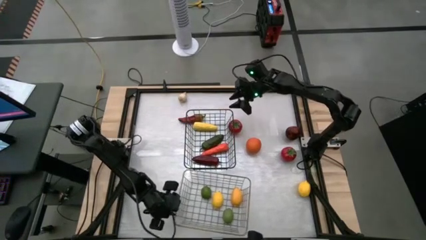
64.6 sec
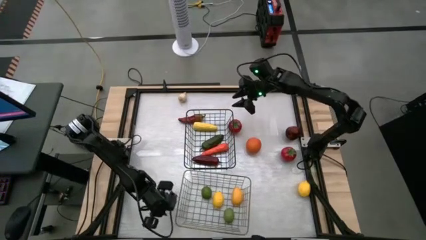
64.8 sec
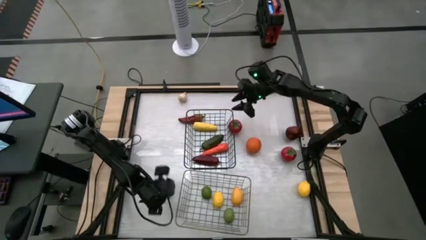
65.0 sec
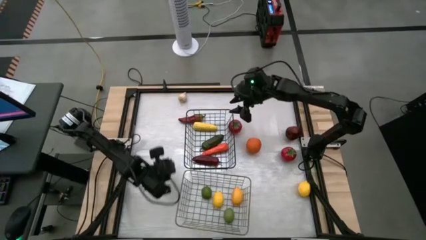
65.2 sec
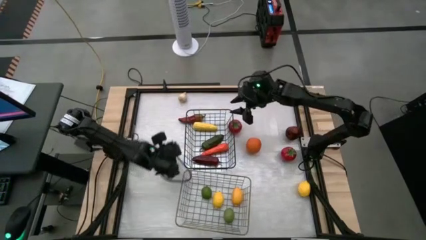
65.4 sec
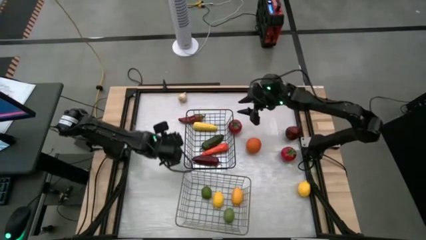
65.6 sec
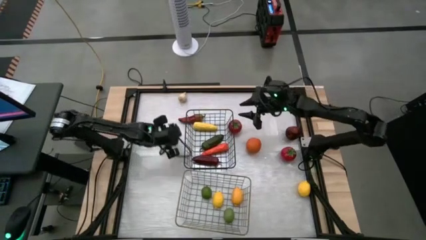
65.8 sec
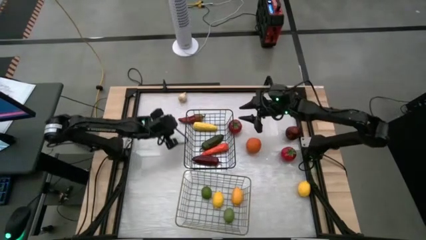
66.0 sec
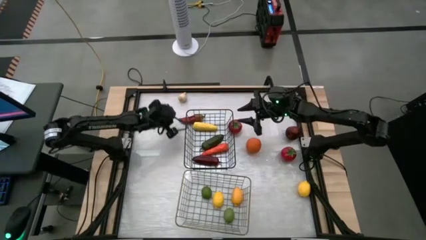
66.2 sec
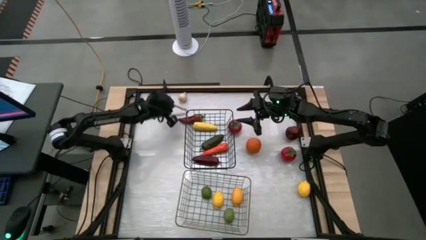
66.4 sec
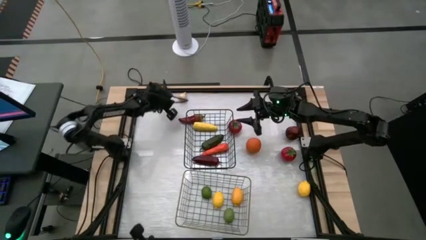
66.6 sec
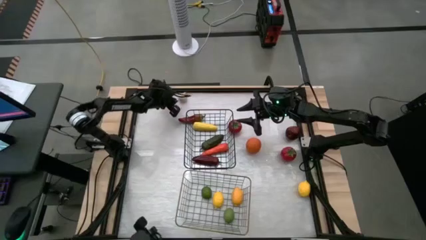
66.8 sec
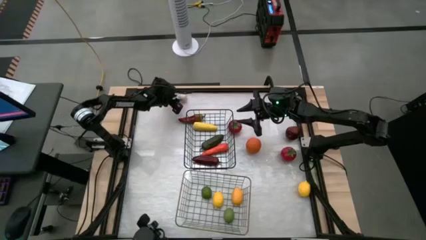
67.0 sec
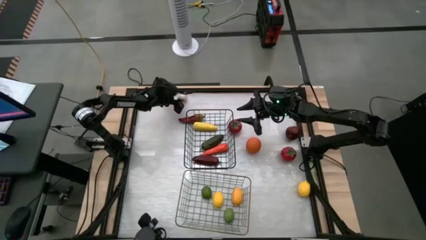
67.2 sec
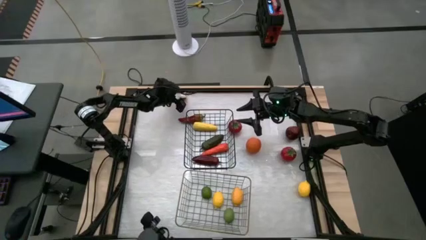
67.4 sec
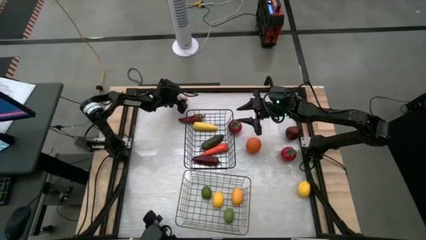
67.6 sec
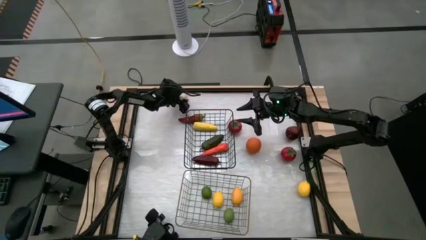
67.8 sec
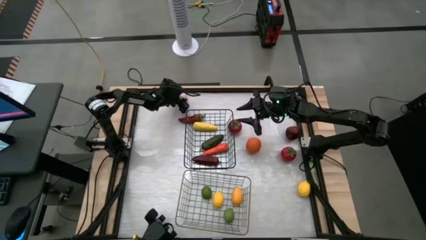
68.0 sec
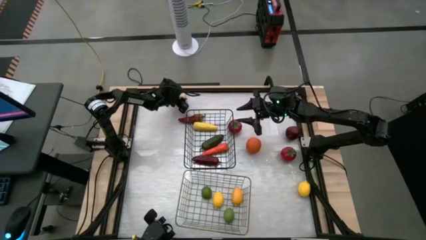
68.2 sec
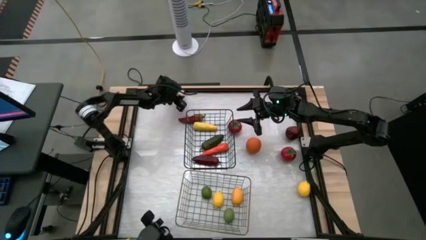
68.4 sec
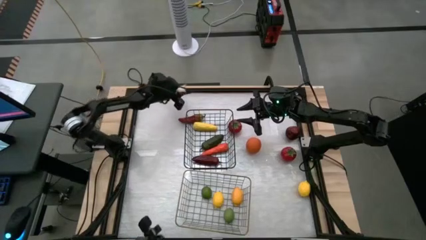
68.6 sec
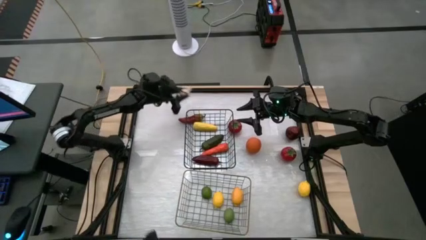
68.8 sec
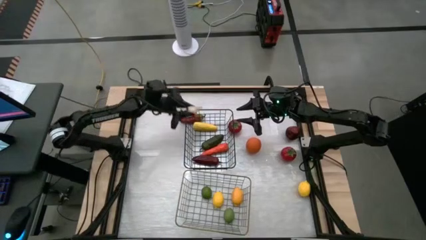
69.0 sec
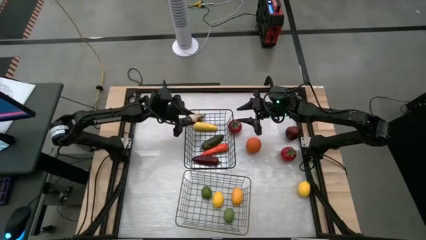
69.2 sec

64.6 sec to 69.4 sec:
Task: Sort produce into baskets
Put the white garlic into the black wire basket

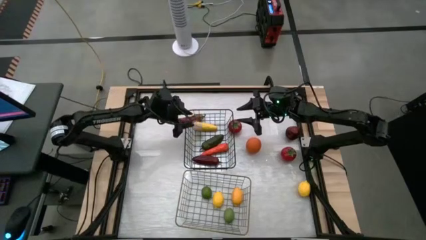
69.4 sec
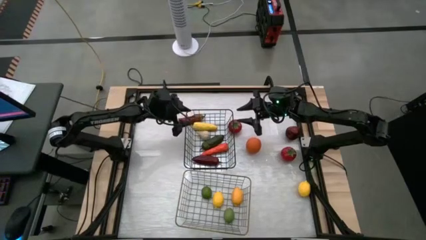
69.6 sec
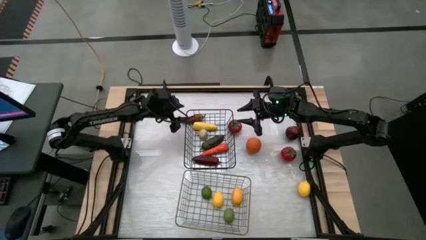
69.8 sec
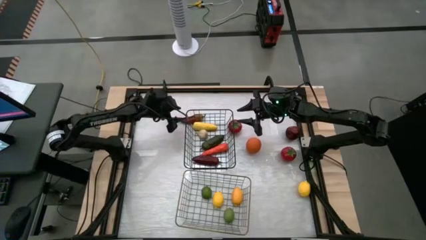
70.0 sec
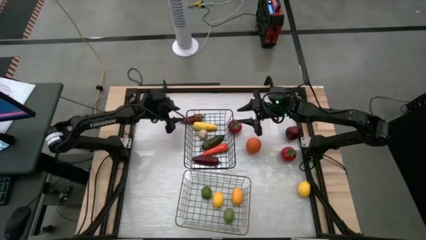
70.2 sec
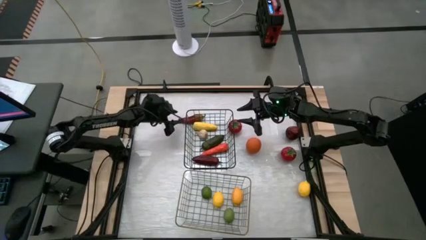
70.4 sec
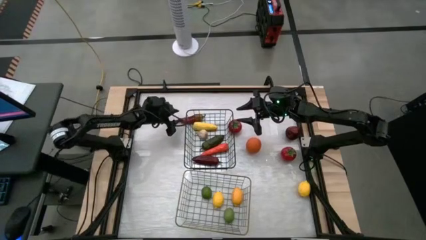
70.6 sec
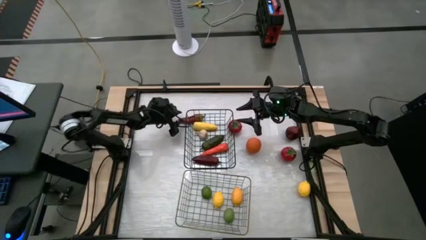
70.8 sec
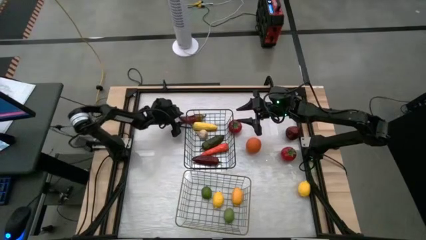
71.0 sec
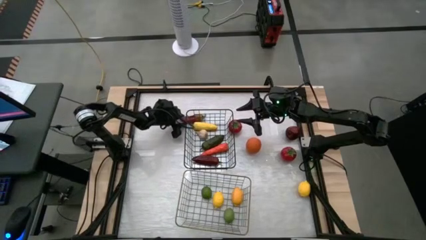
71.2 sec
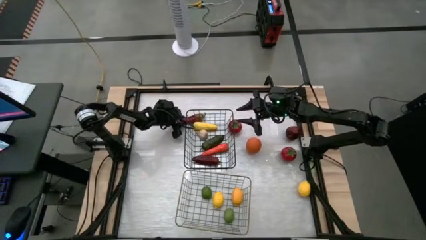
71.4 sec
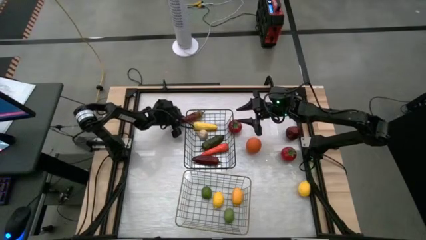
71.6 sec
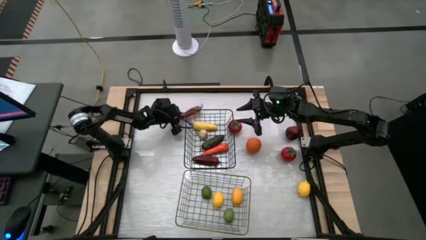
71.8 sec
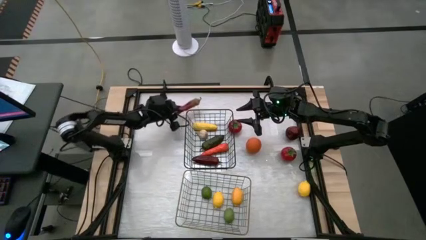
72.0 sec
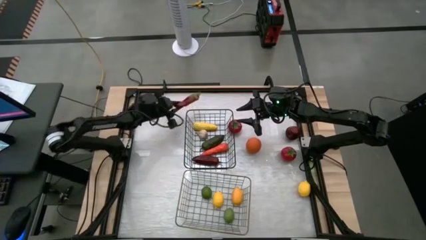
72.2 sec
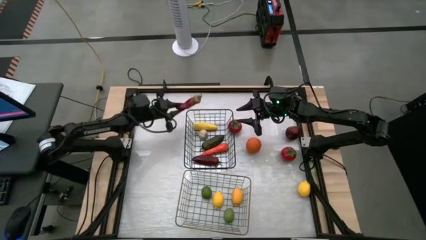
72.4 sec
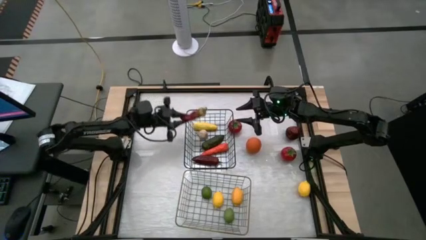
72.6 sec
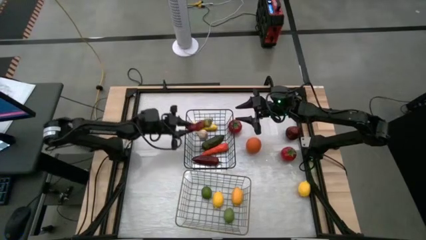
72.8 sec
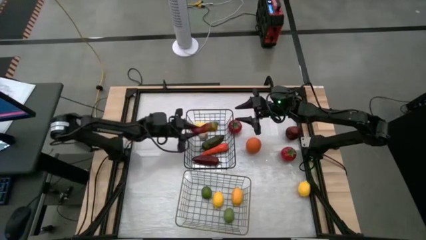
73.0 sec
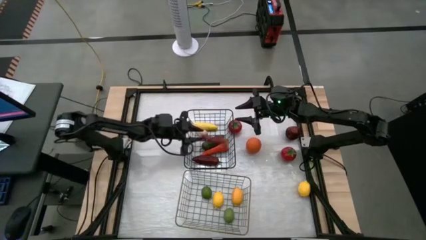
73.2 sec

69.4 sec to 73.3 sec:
Put the red chili pepper into the black wire basket

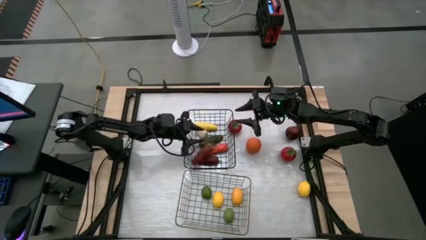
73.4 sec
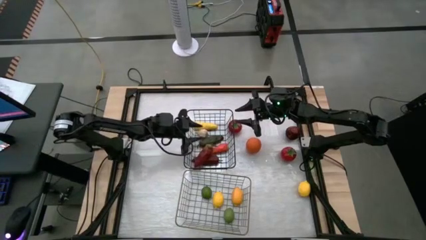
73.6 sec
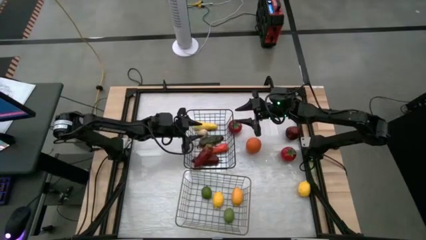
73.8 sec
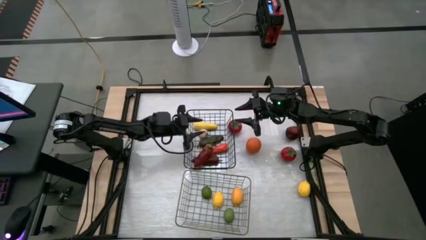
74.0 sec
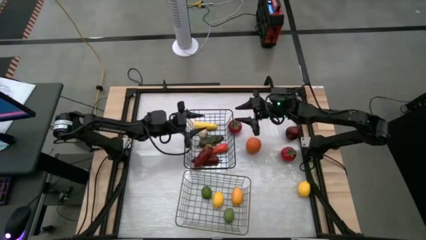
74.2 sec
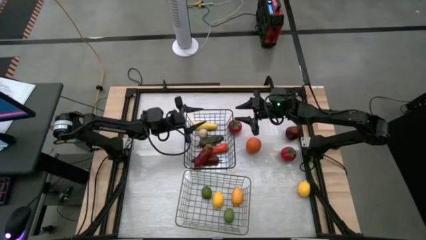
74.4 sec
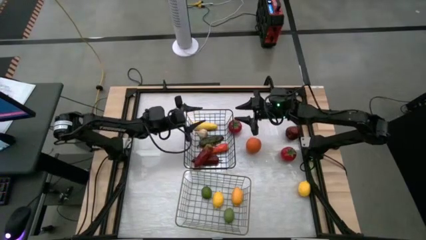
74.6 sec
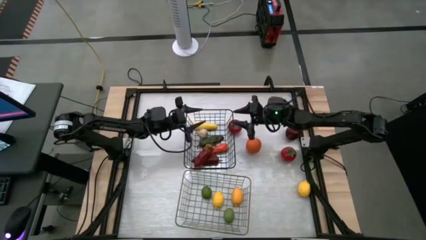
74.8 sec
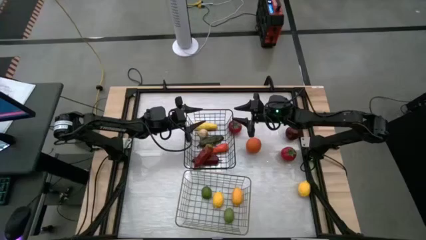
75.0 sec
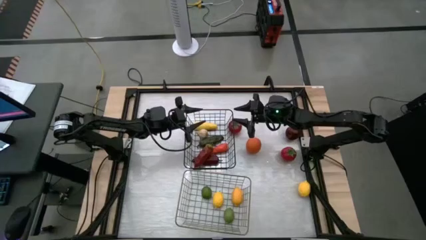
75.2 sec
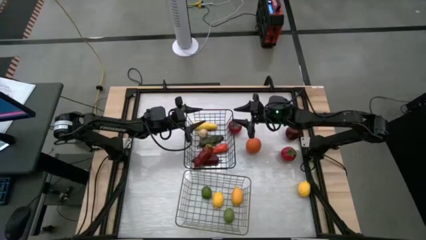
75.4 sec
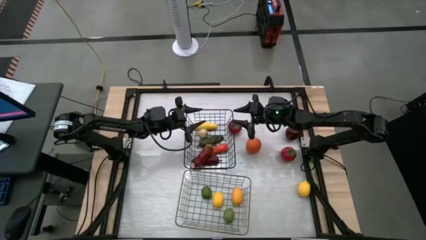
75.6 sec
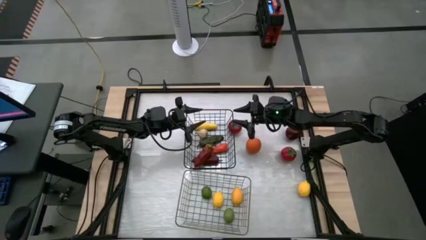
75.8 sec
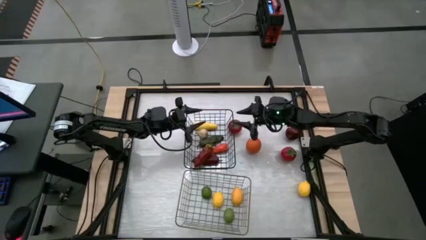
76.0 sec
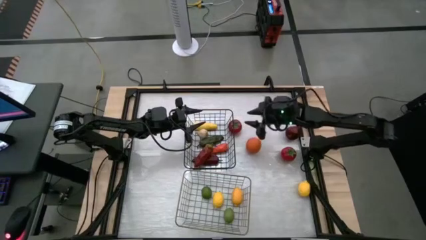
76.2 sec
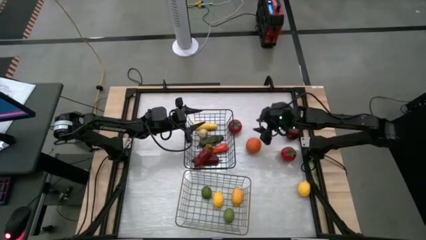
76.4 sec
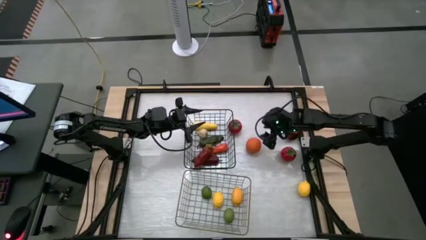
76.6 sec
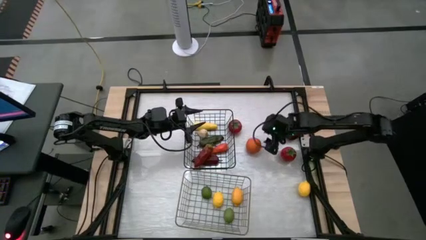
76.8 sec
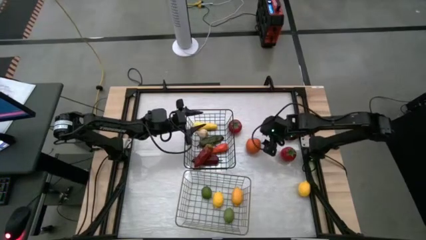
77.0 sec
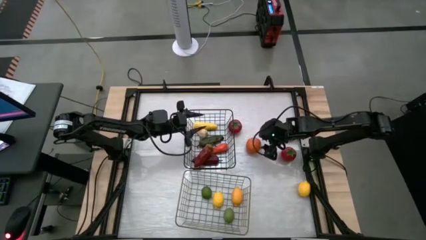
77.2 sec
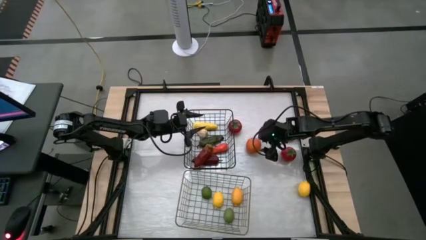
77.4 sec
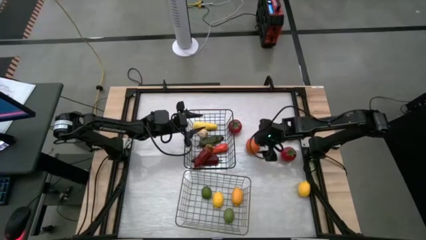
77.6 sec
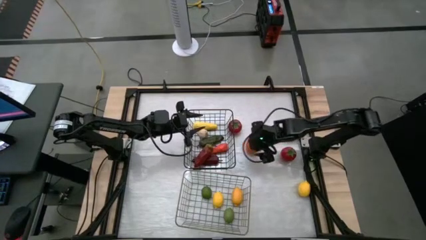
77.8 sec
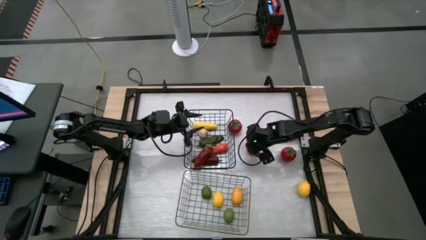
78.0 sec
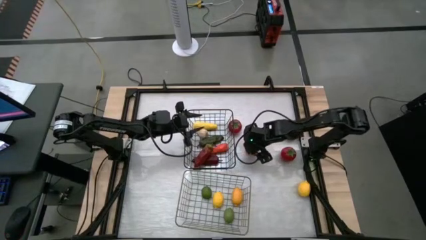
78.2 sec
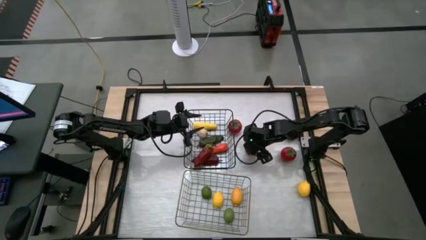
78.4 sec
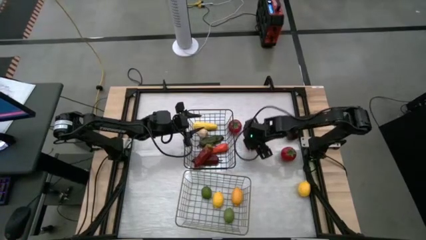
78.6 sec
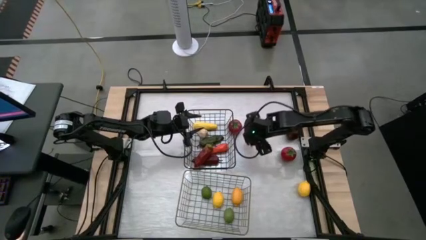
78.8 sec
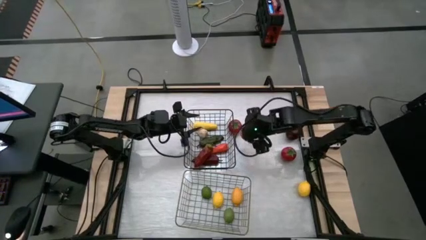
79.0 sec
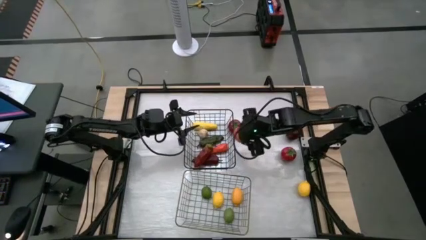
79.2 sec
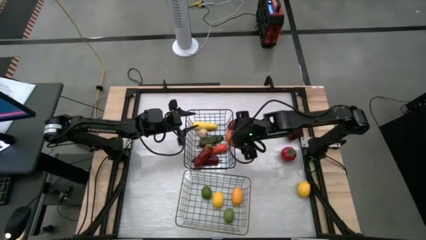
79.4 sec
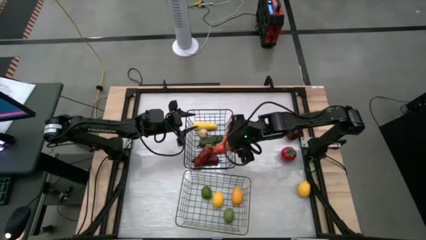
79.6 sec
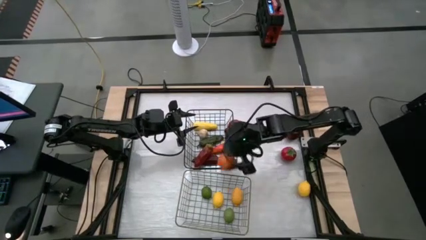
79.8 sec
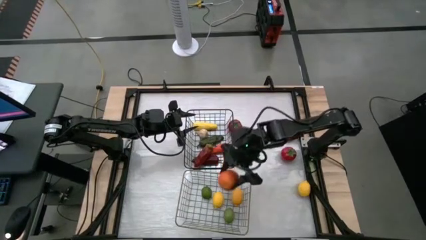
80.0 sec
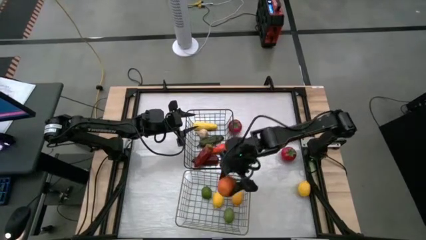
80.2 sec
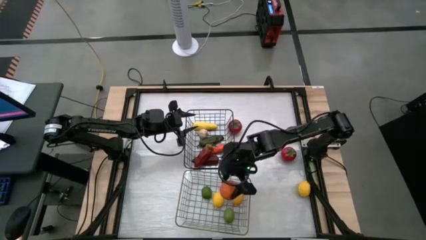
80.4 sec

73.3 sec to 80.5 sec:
Put the orange into the gold wire basket

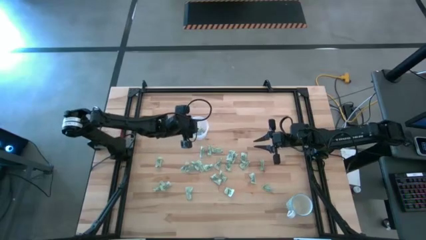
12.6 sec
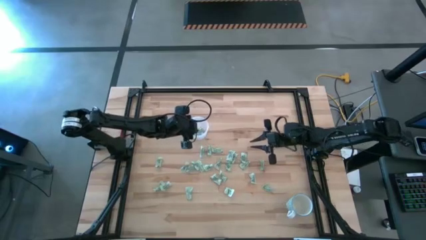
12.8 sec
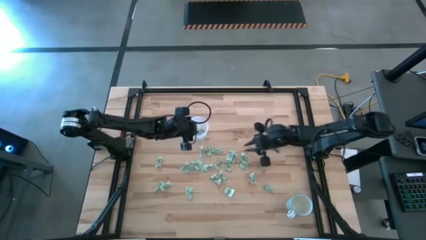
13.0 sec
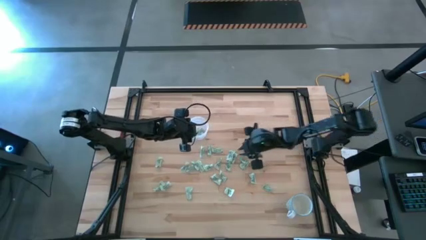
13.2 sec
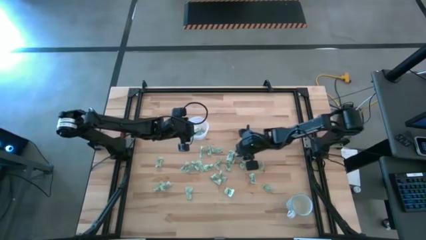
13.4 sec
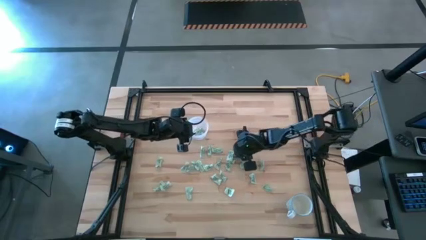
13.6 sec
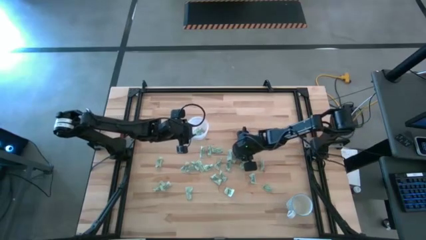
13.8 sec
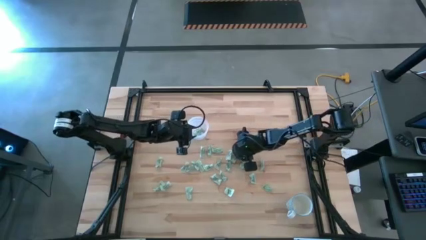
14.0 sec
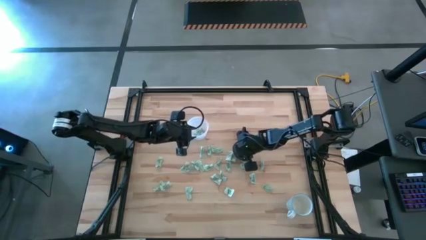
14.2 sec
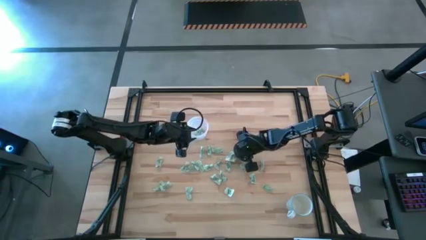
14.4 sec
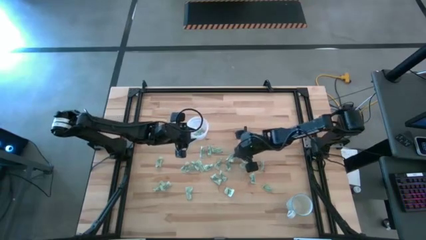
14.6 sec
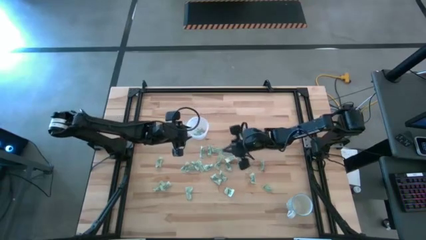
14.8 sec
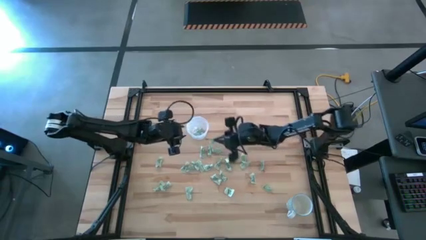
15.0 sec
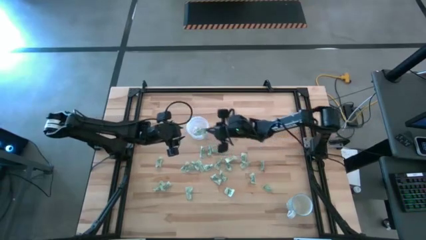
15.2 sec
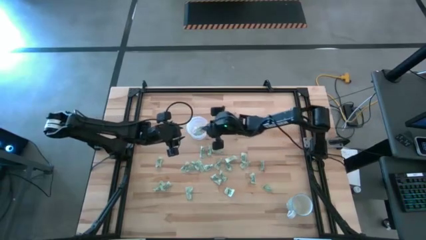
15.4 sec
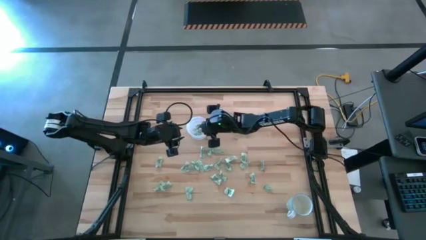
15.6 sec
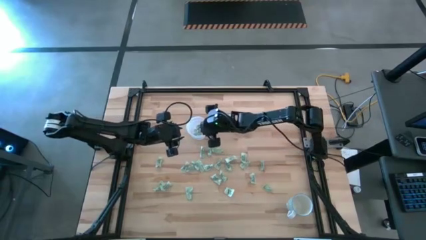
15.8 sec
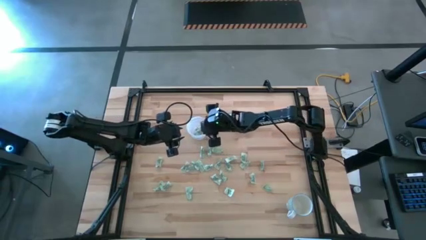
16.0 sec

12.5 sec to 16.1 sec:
Task: Pick and place Stevia / Truvia into bins
Put the stevia packet into the transparent container
